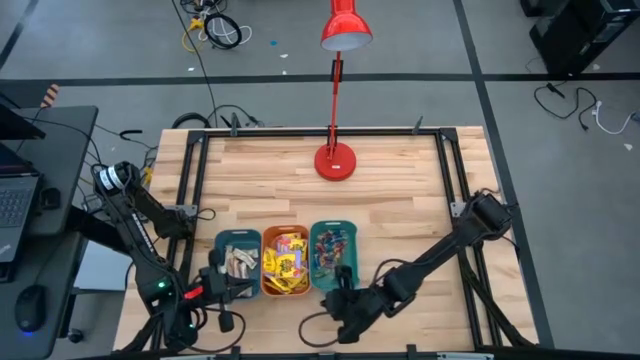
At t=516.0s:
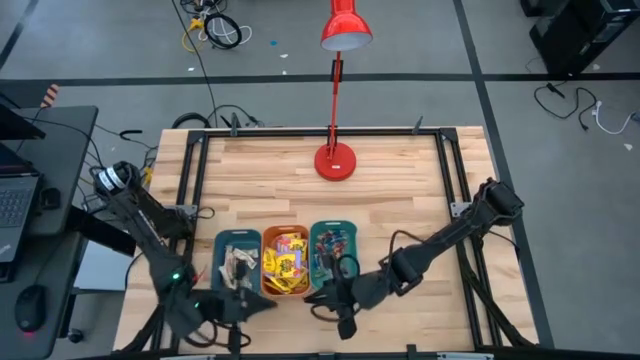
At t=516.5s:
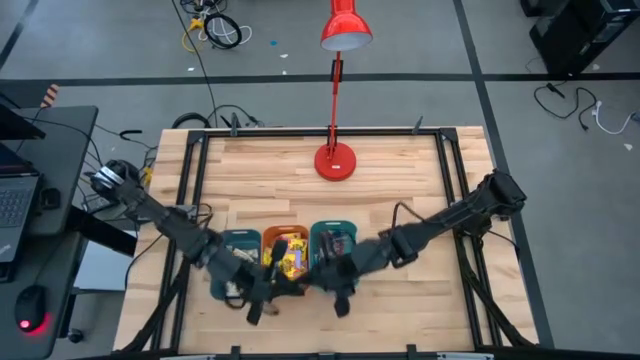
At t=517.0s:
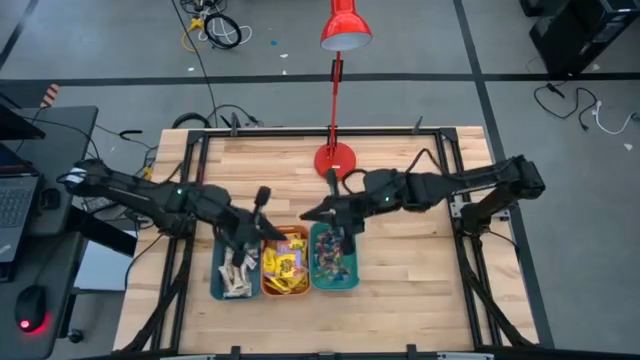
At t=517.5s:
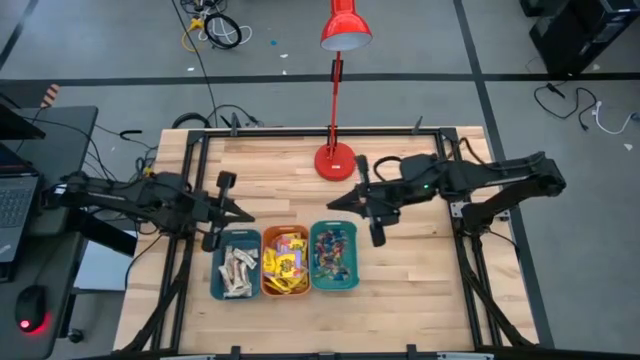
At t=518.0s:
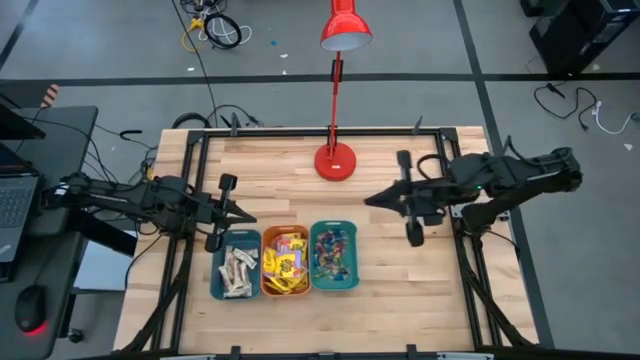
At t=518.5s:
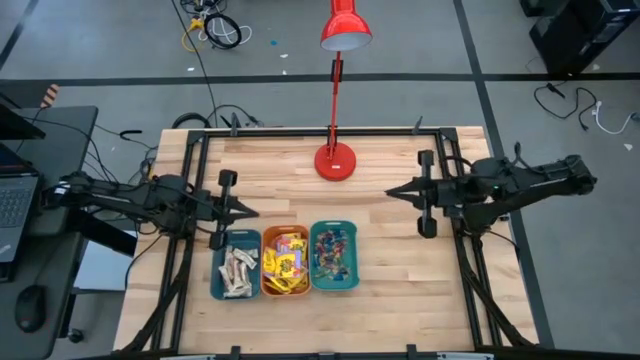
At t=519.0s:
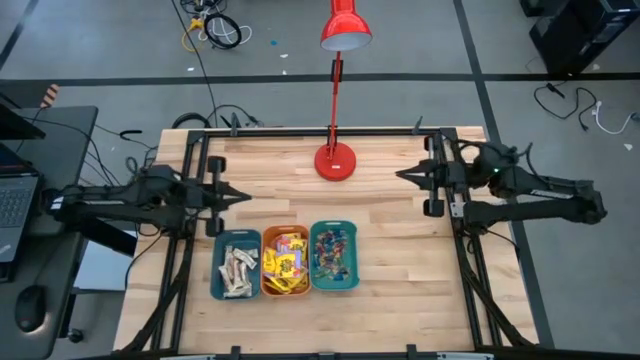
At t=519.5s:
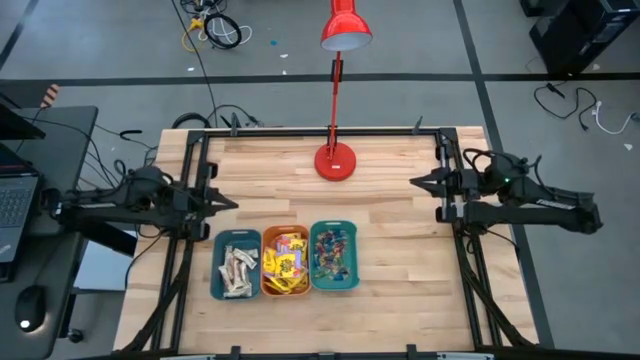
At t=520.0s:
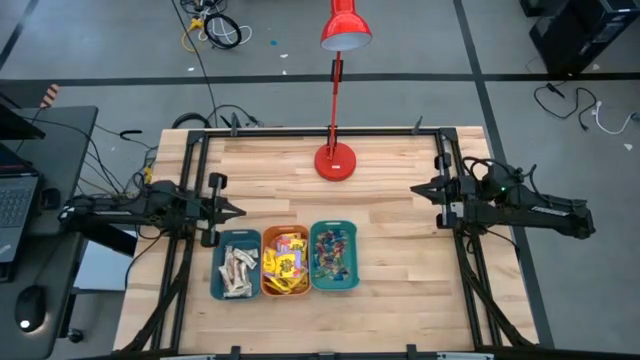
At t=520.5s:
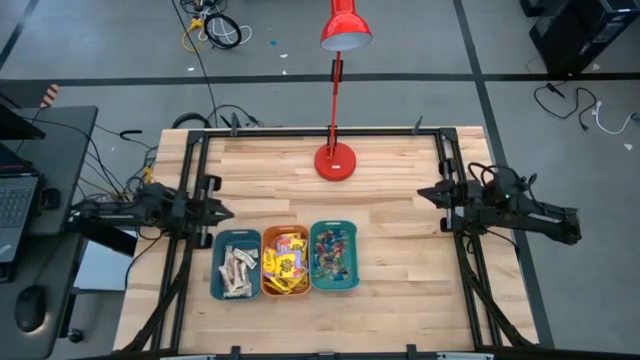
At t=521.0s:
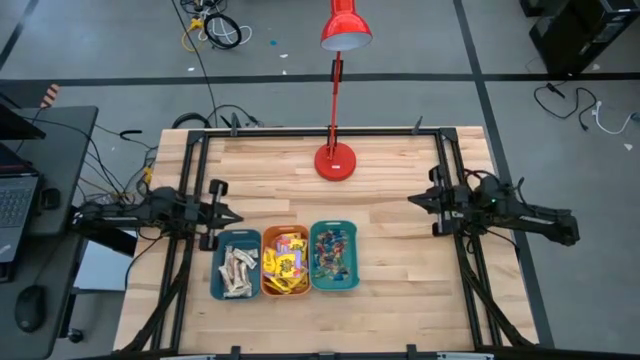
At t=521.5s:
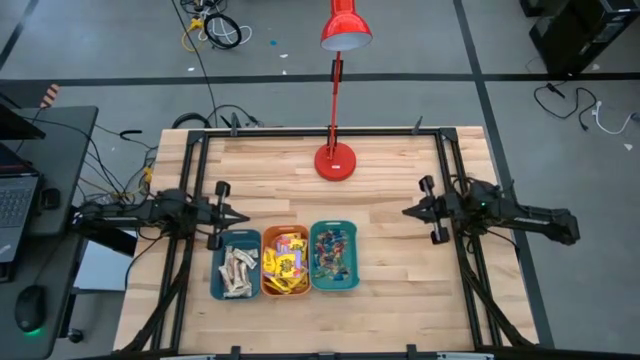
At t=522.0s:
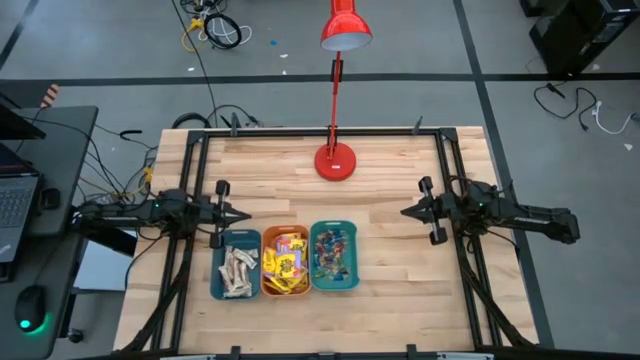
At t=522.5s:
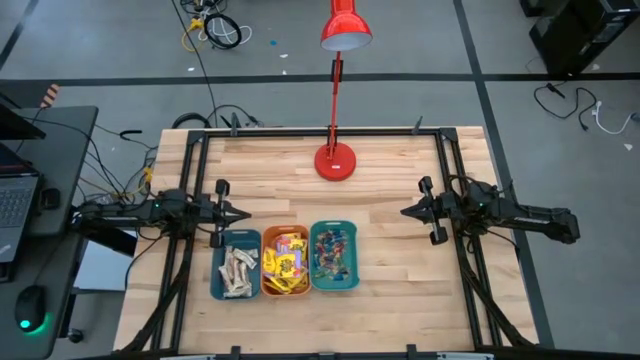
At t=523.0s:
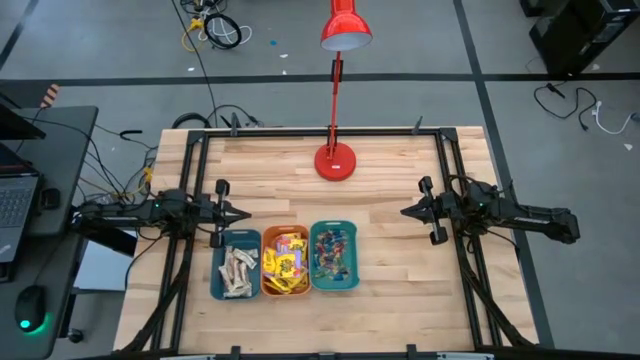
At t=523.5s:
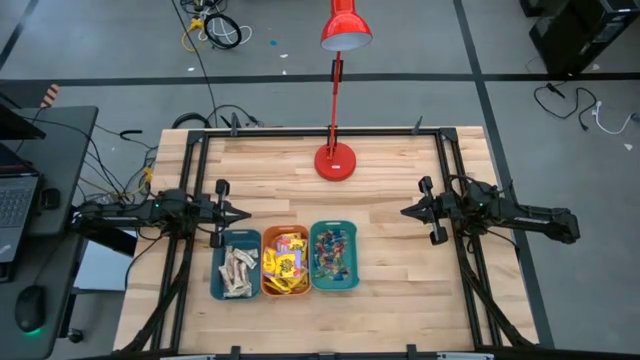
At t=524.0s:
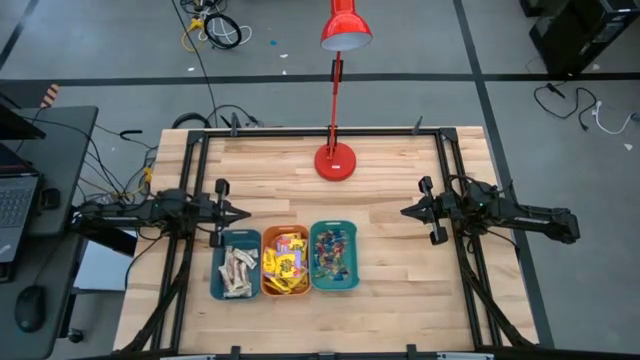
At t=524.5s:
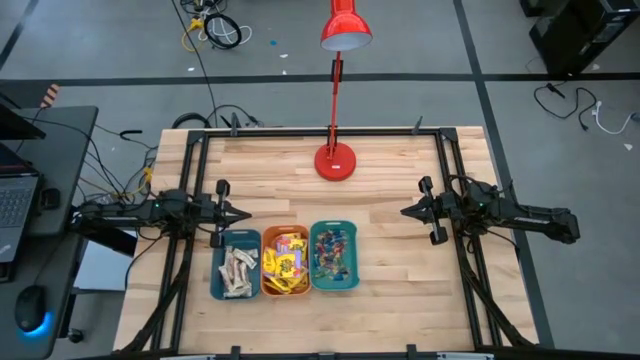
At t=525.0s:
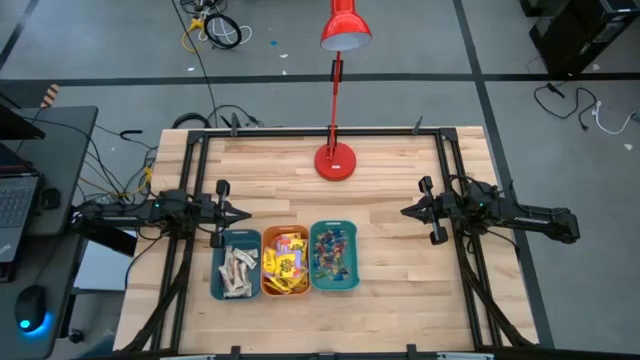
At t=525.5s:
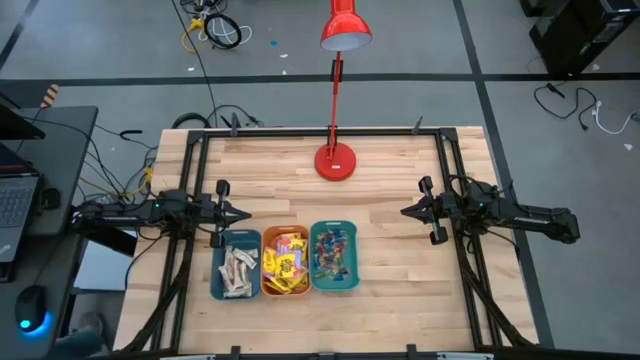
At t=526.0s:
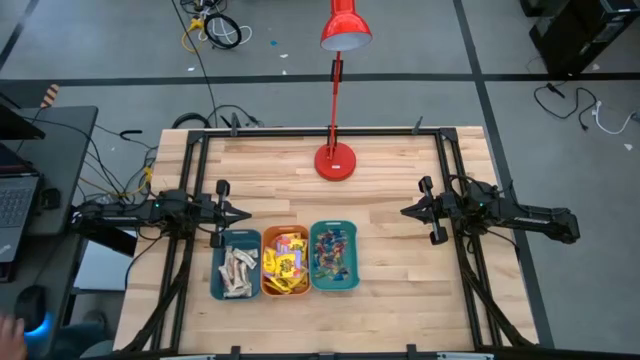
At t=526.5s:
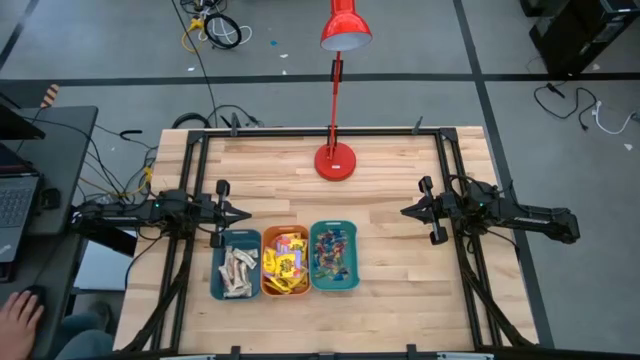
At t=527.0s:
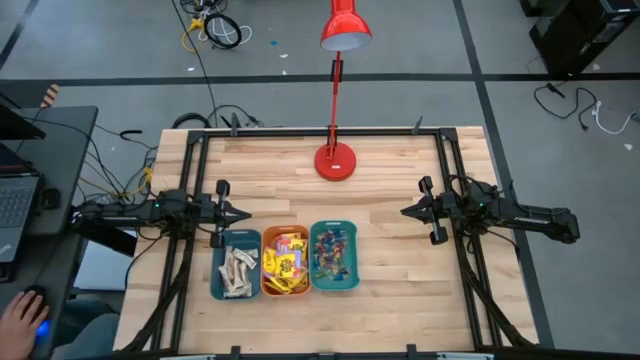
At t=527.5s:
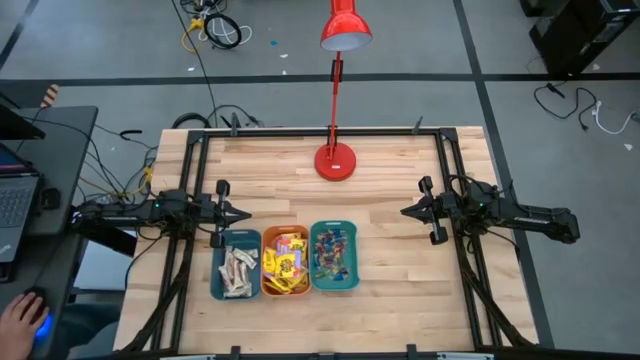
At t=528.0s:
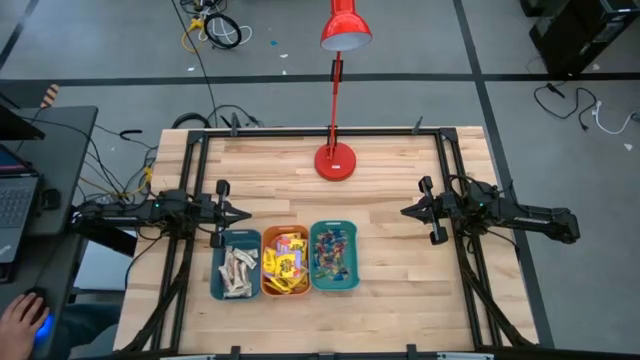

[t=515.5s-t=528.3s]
Task: Sort candy
Return to Home Position

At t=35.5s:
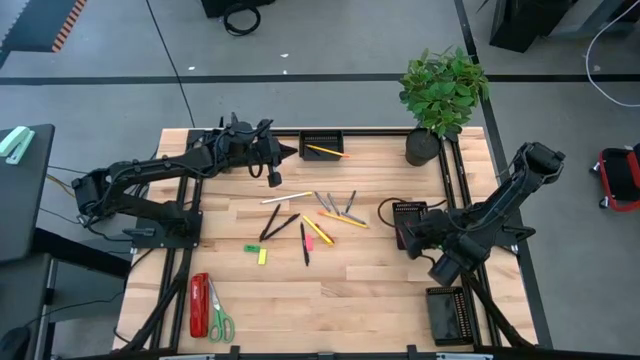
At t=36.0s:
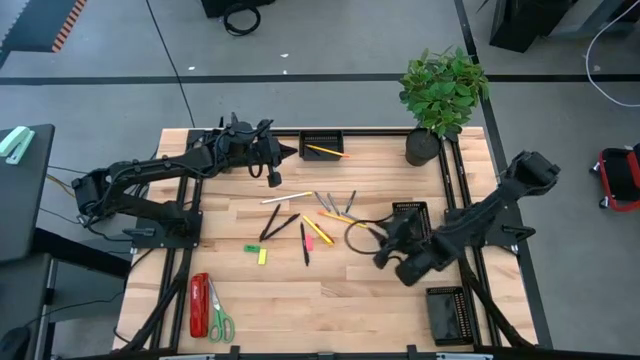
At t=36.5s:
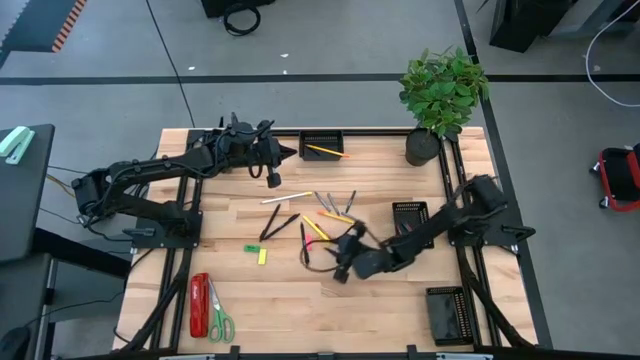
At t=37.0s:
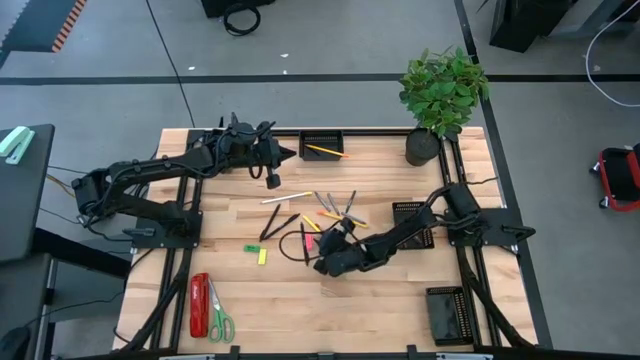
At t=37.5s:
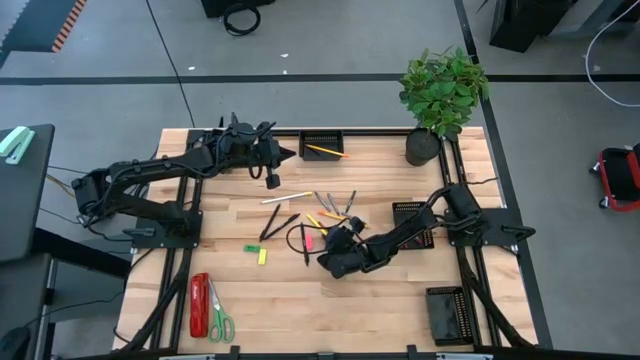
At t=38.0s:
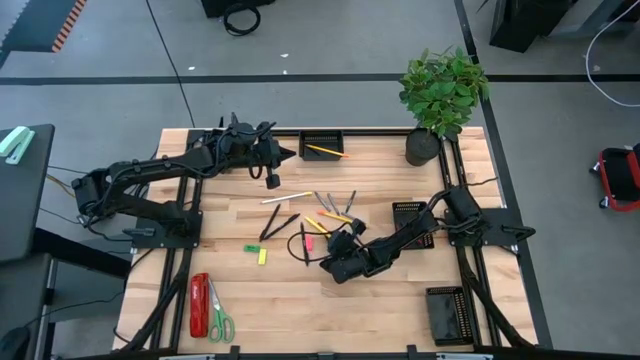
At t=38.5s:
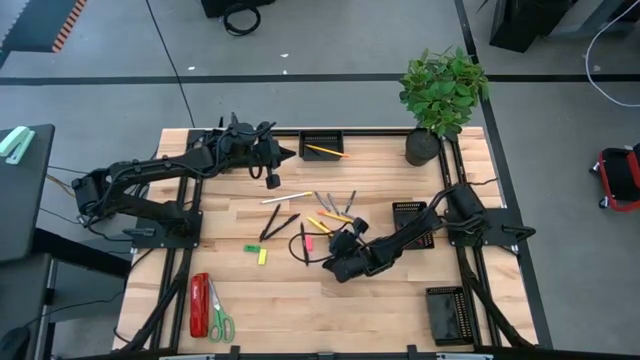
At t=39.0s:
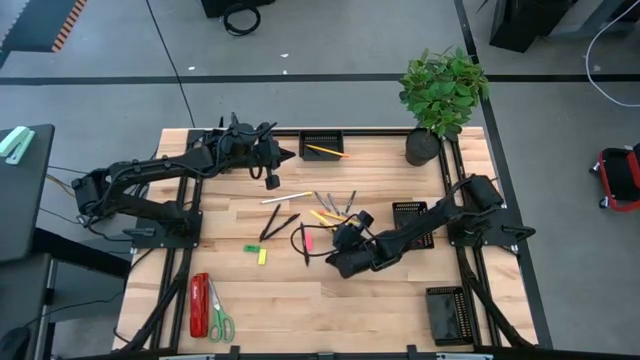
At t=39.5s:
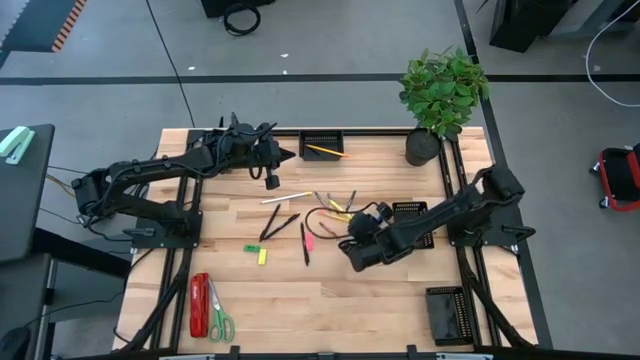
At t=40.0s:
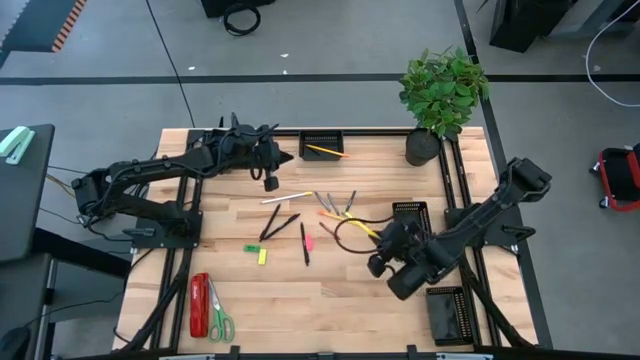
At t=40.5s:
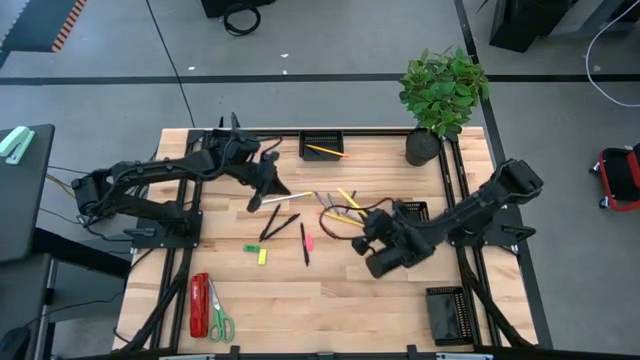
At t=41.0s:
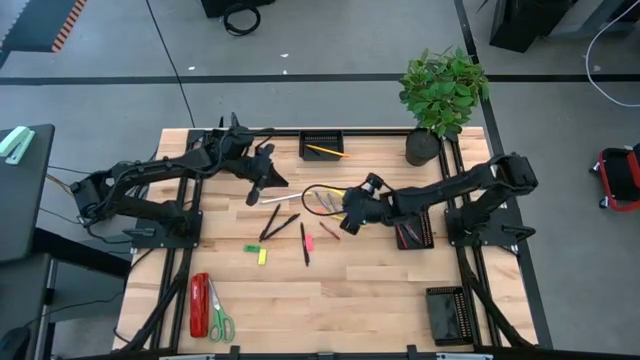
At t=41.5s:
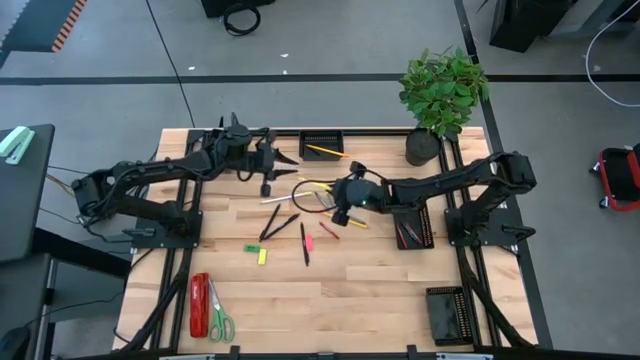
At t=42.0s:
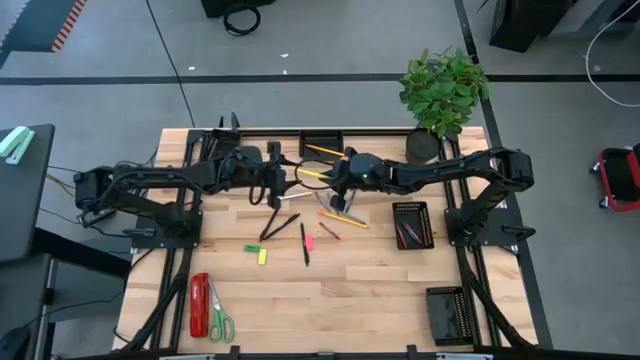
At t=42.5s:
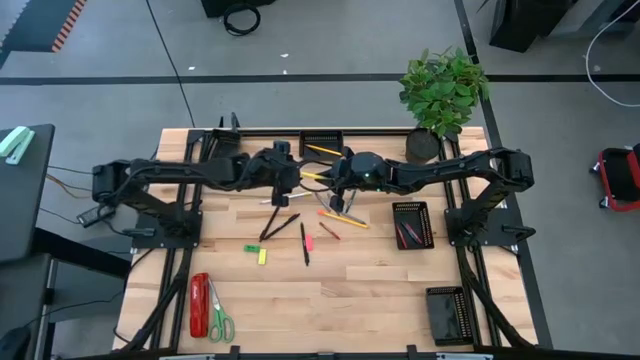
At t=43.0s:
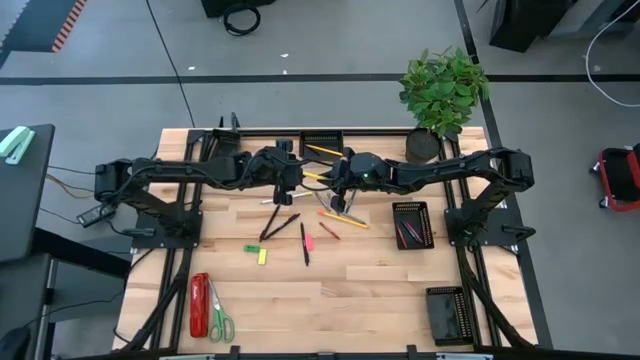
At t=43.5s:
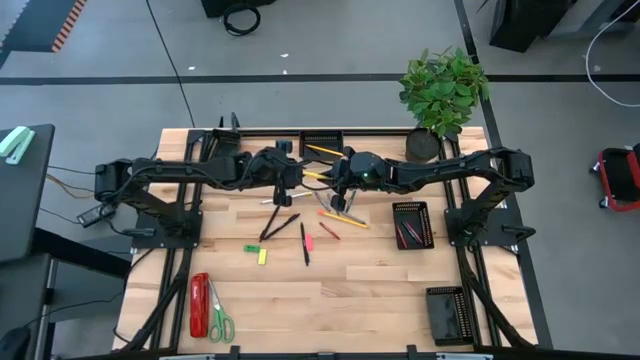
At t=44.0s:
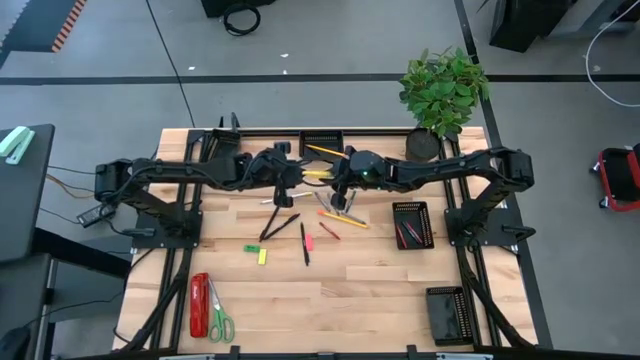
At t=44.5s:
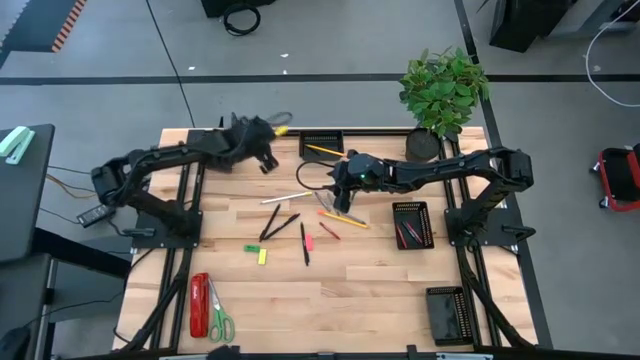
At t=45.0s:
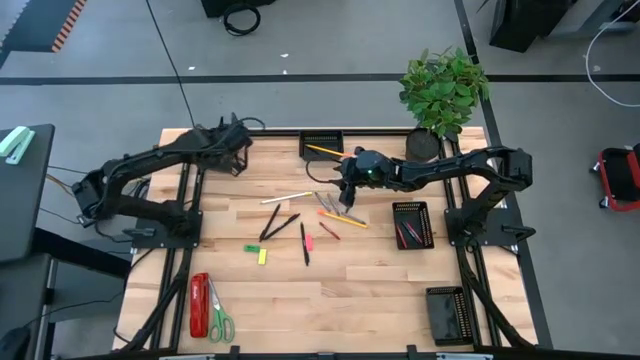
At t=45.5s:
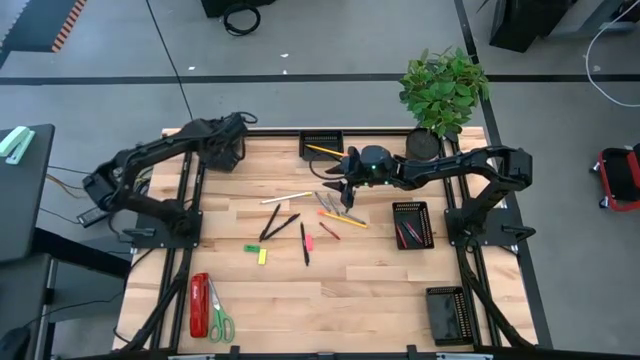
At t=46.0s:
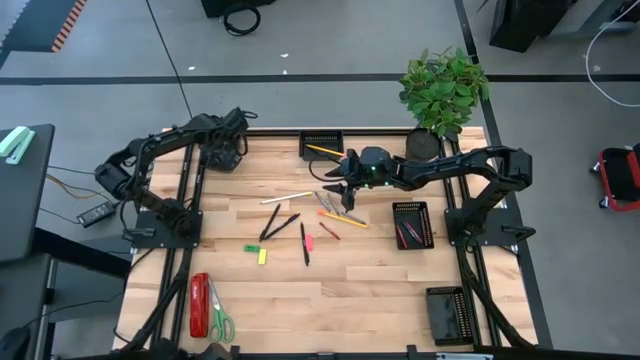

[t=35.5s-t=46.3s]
Task: Sort crayons/erasers/pens/pencils in bins
Put the yellow pen into the top left black bin
